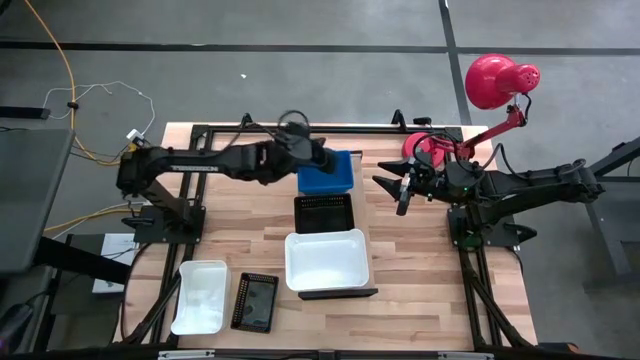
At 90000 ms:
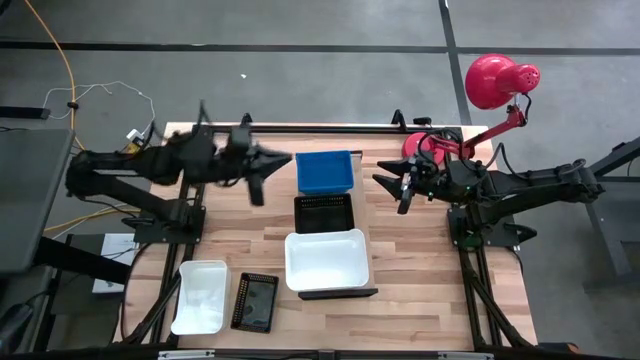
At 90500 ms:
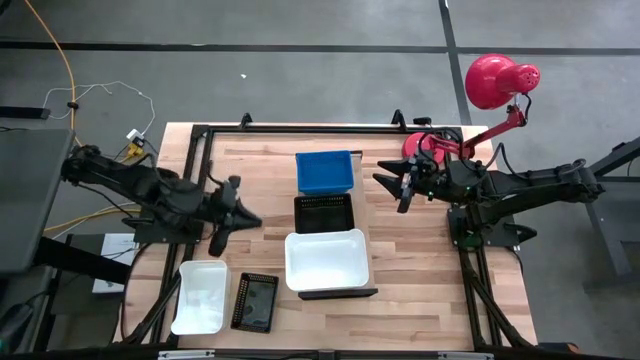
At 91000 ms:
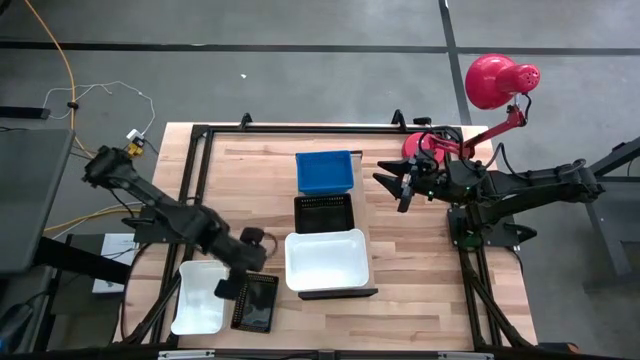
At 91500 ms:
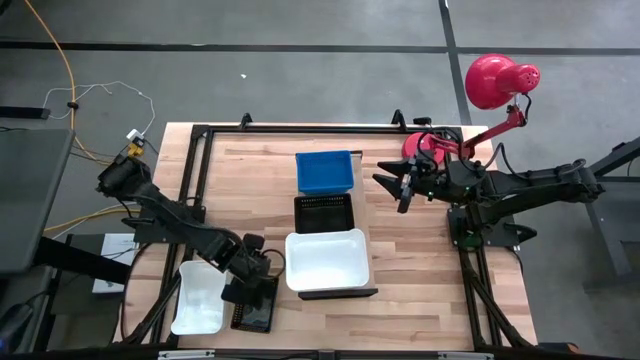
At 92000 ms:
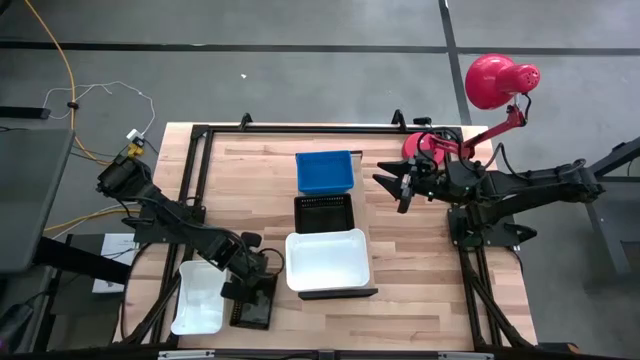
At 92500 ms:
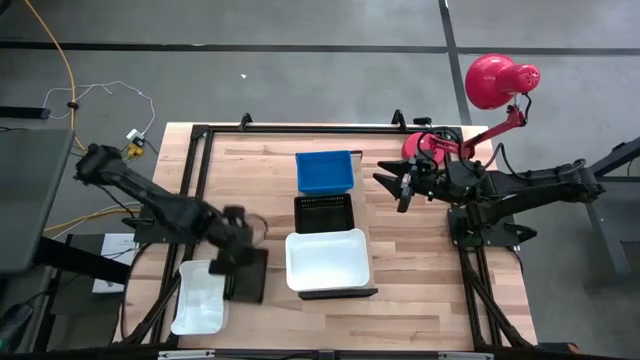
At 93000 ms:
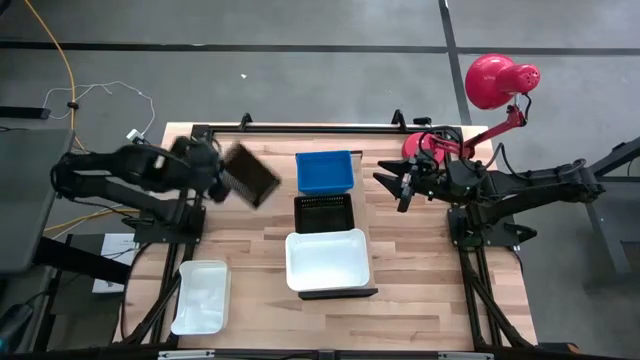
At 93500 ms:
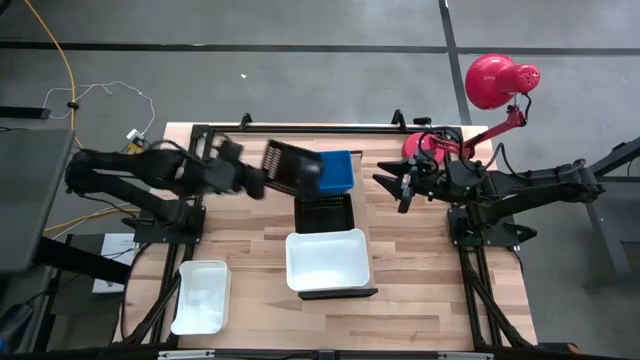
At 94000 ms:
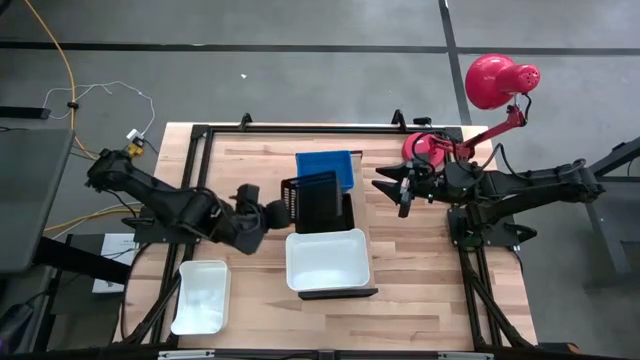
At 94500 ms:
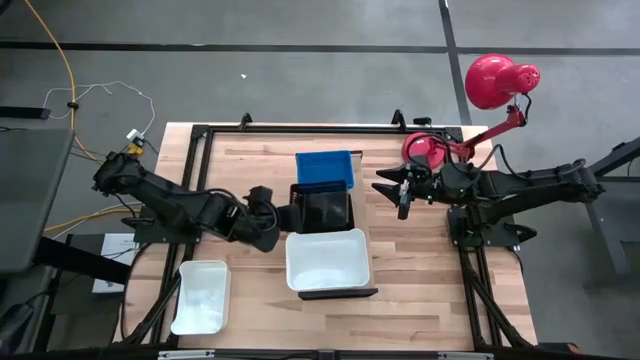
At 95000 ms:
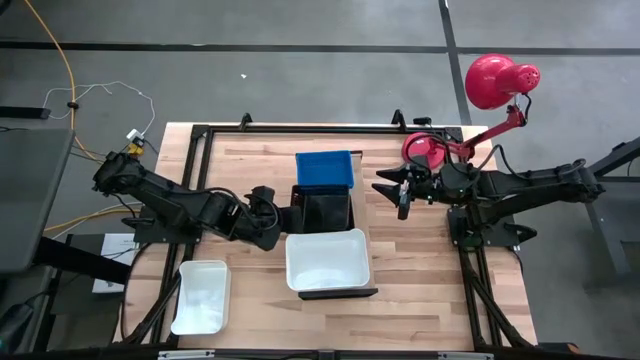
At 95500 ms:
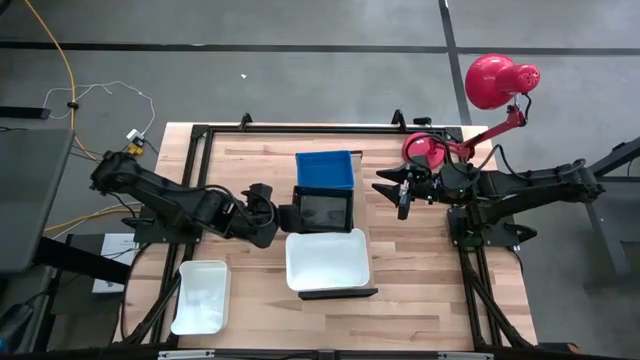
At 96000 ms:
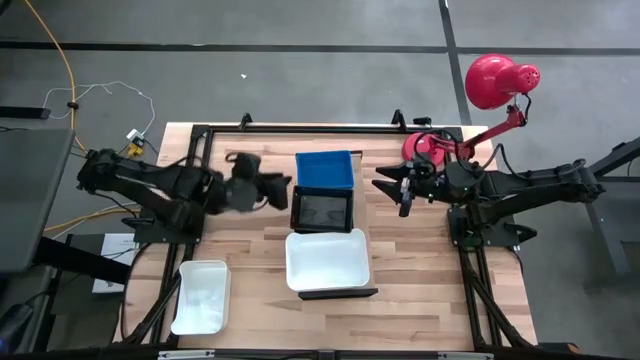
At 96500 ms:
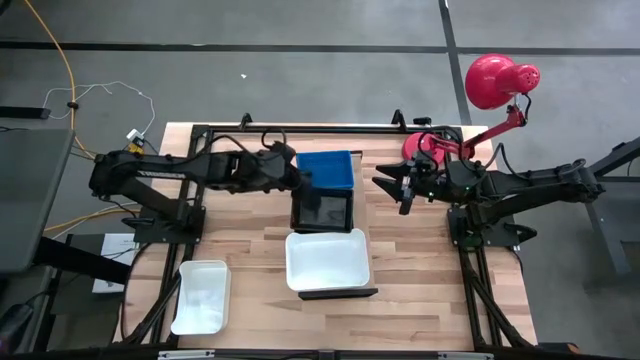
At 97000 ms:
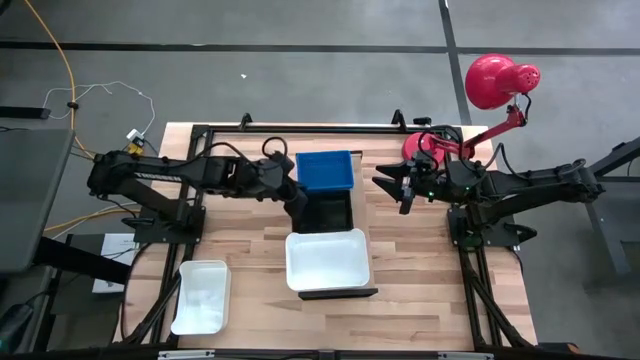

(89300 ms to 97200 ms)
Task: Stack baskets on shelf by color
Stack the black bin on the black bin on the shelf

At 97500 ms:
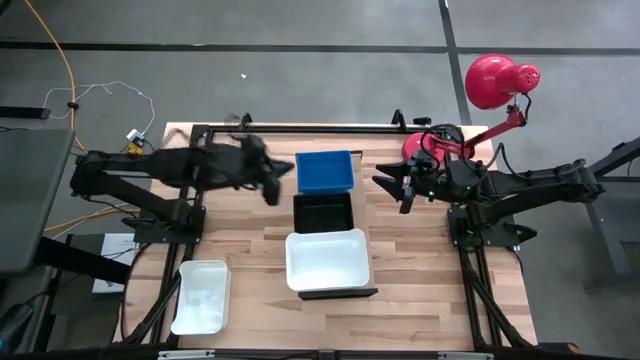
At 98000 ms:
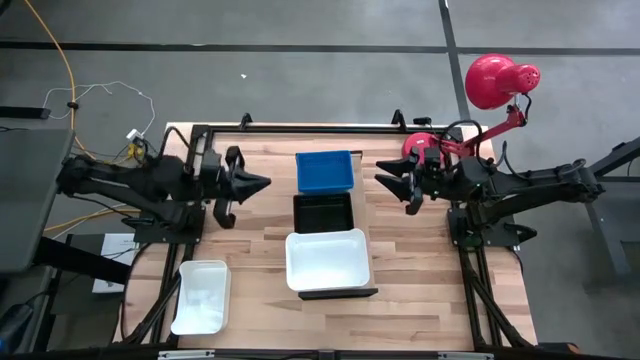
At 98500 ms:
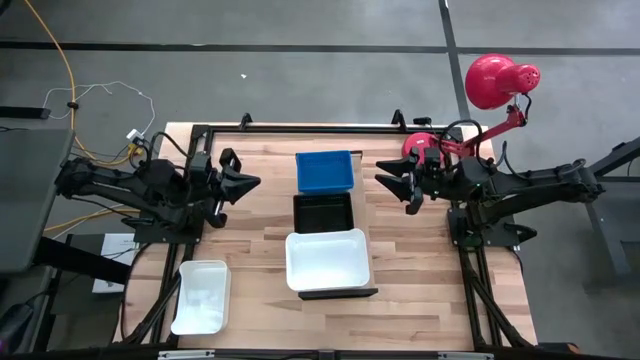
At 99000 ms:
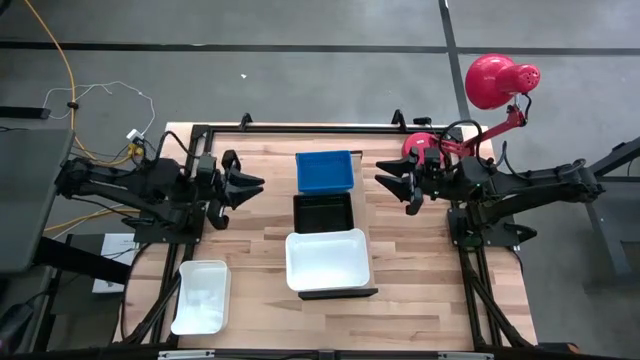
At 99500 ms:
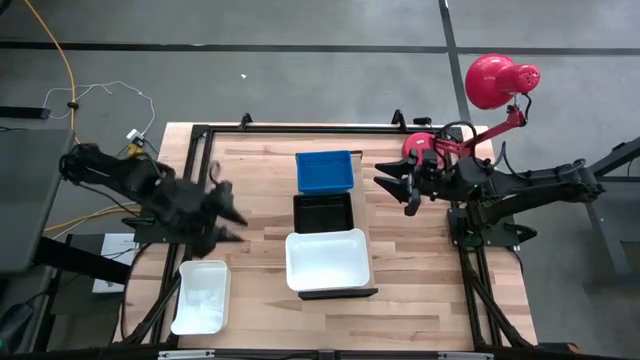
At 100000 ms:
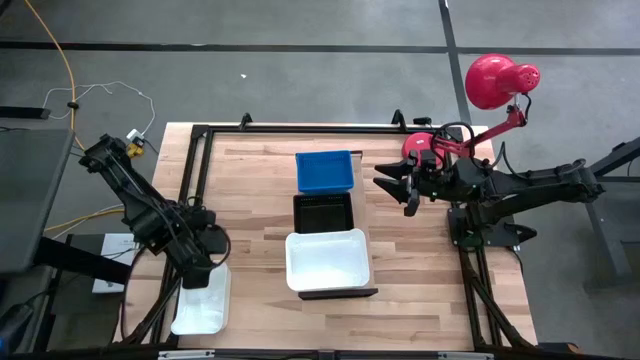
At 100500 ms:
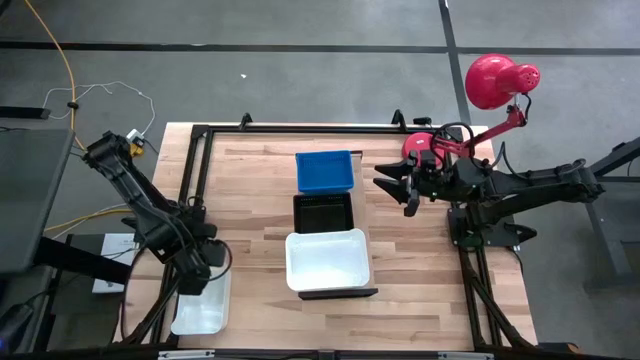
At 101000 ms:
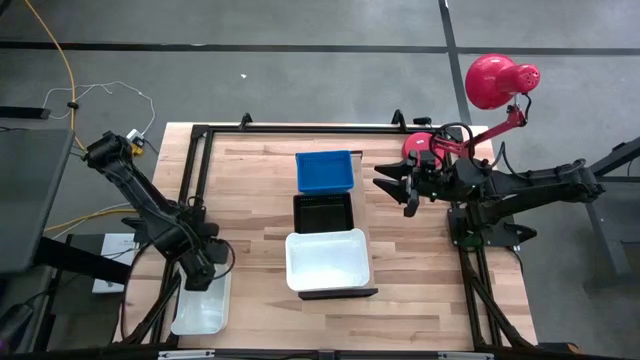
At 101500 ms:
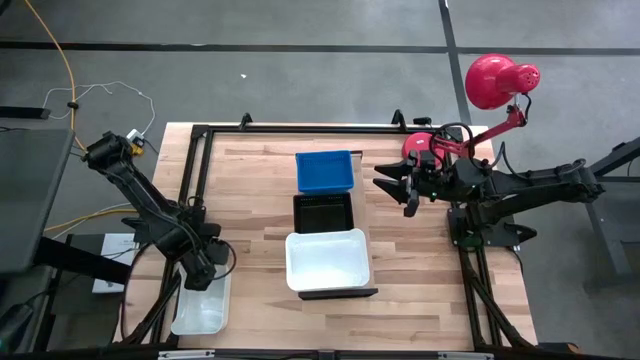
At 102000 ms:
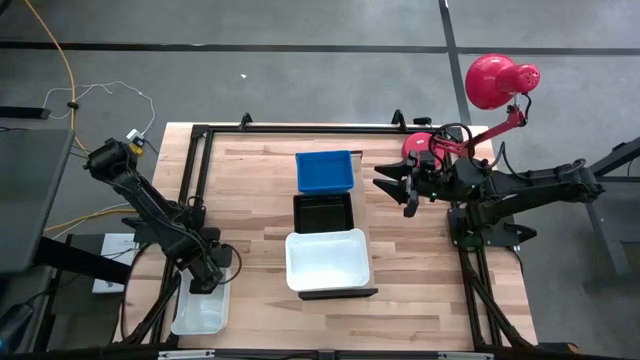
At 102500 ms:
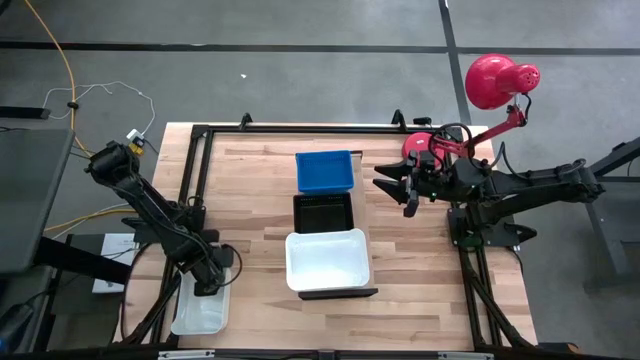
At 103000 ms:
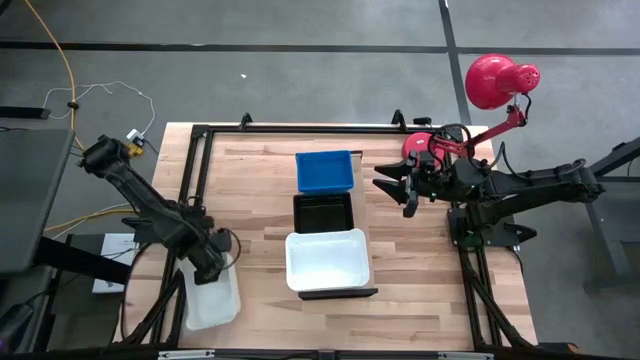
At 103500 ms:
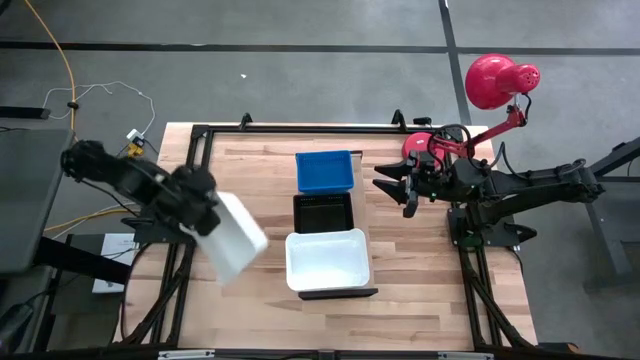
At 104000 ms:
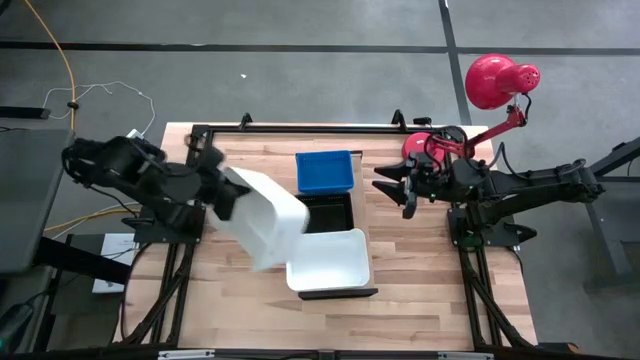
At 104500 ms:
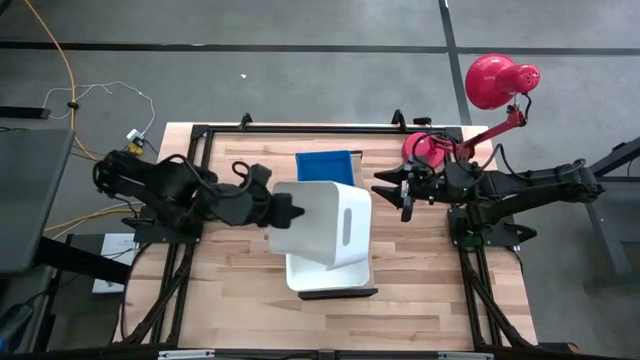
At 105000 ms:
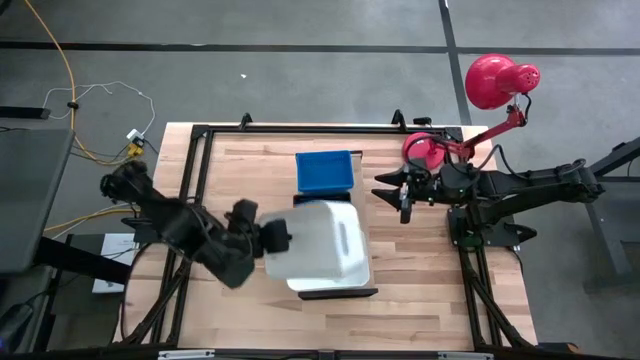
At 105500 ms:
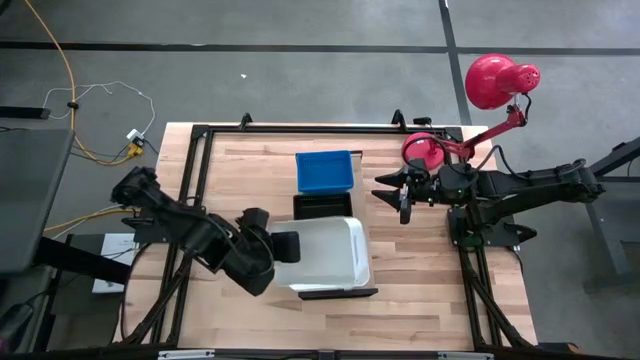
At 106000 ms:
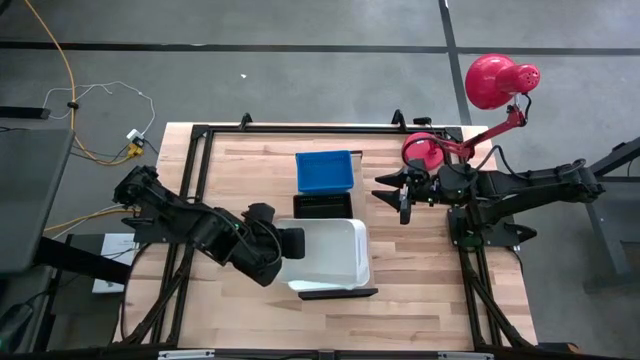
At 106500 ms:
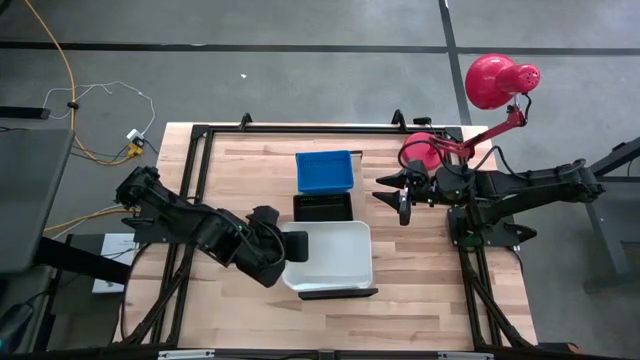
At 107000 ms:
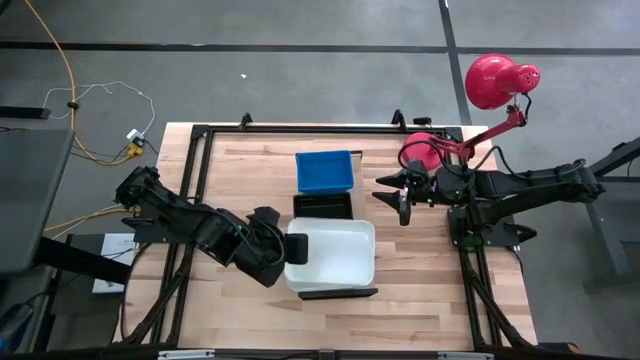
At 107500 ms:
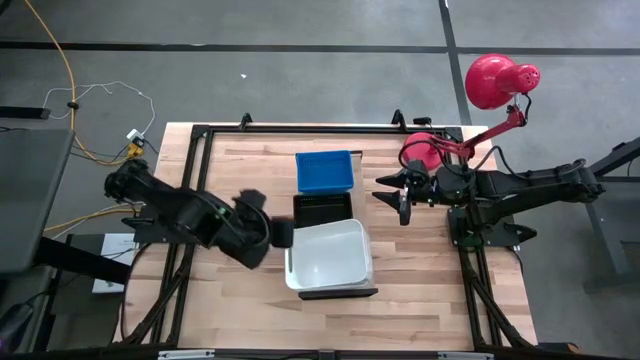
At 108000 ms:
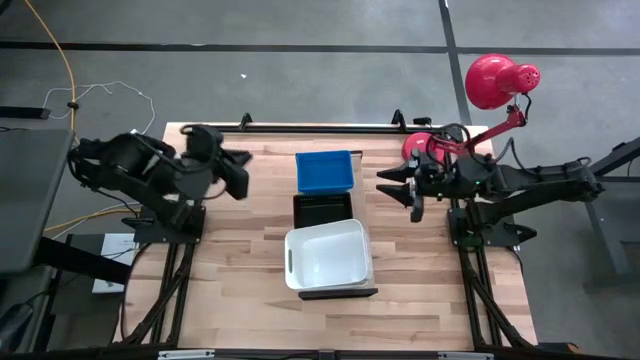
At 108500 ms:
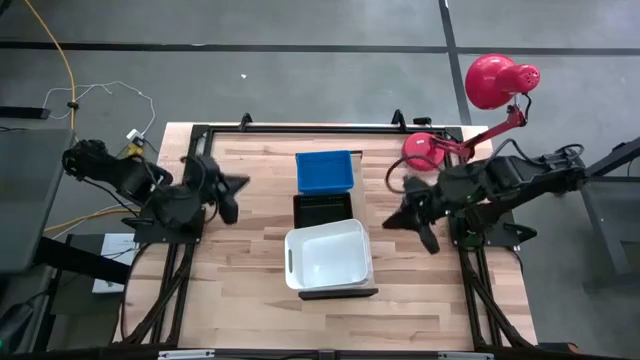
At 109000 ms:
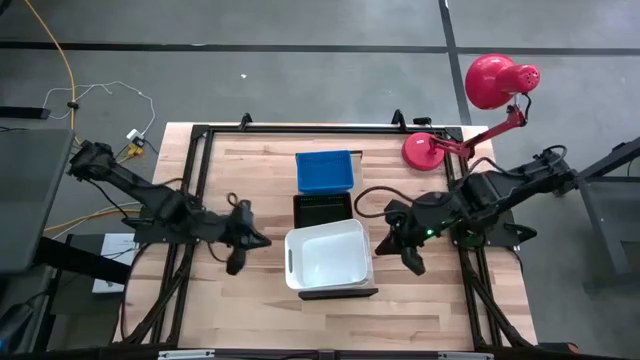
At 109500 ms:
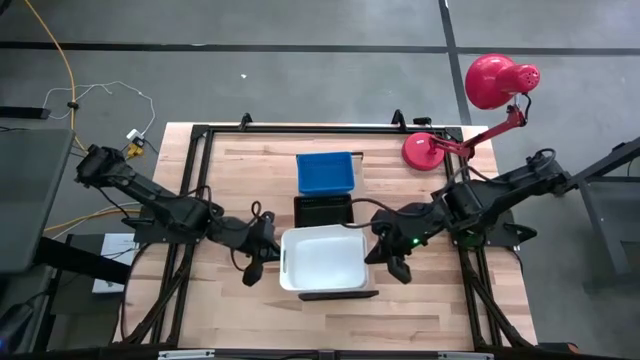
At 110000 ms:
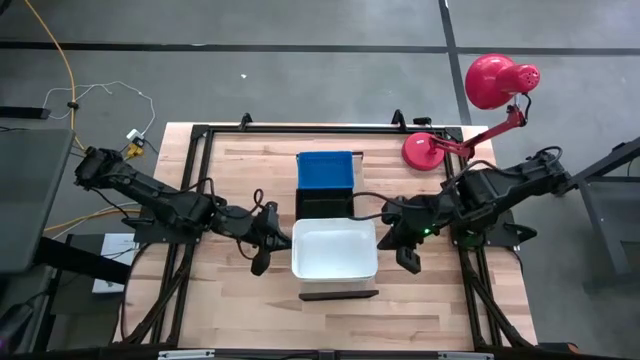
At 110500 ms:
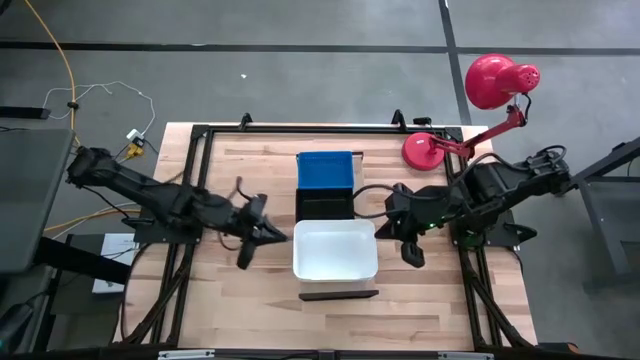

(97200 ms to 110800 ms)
Stack the white bin on the white bin on the shelf
